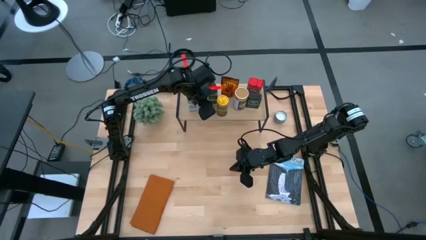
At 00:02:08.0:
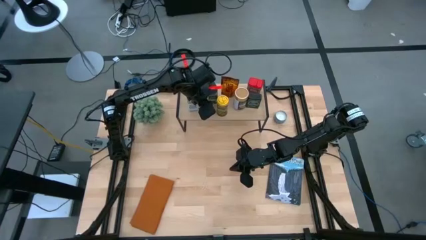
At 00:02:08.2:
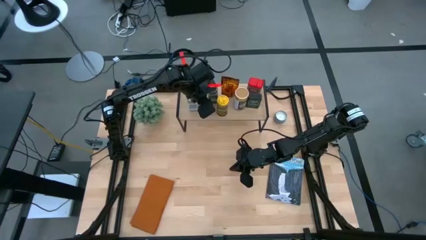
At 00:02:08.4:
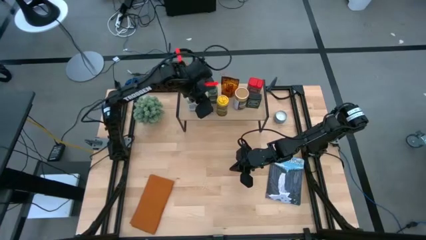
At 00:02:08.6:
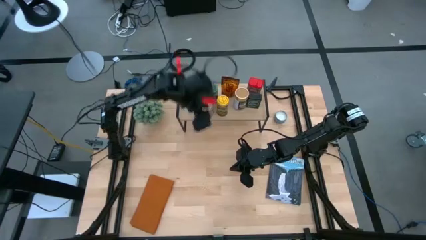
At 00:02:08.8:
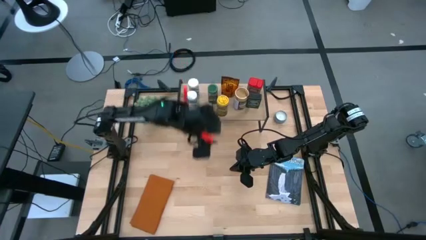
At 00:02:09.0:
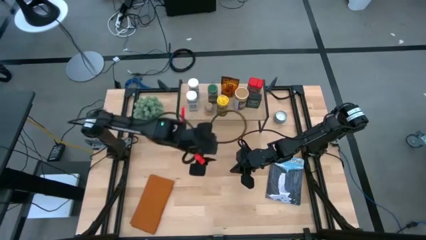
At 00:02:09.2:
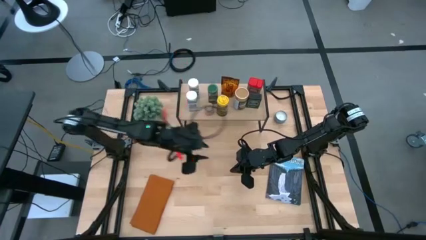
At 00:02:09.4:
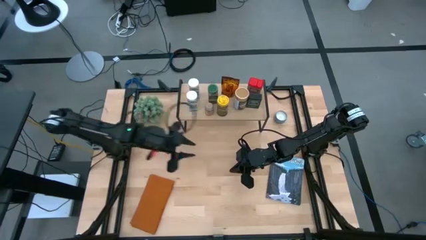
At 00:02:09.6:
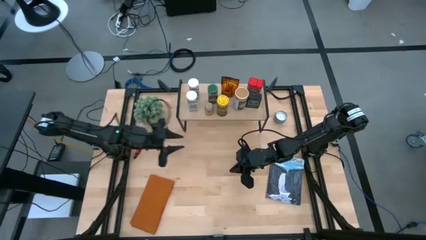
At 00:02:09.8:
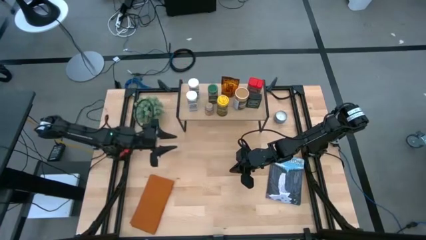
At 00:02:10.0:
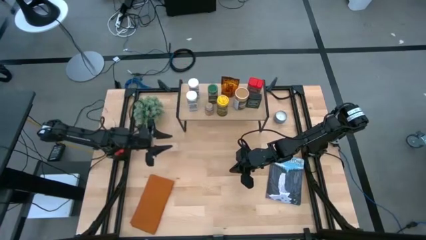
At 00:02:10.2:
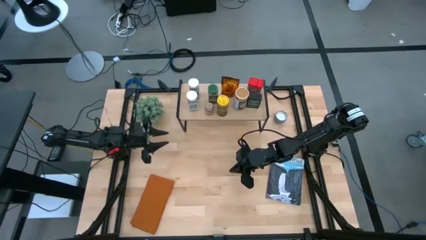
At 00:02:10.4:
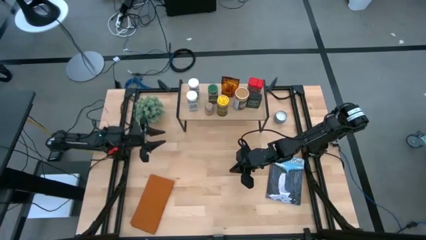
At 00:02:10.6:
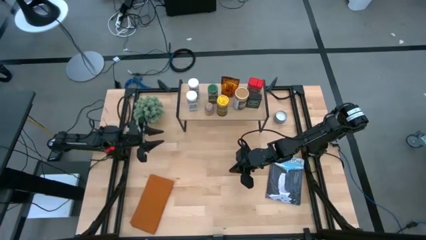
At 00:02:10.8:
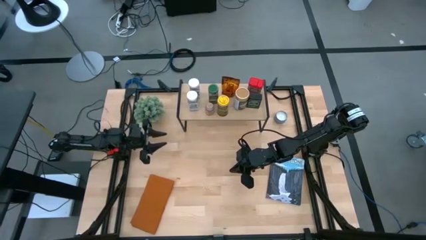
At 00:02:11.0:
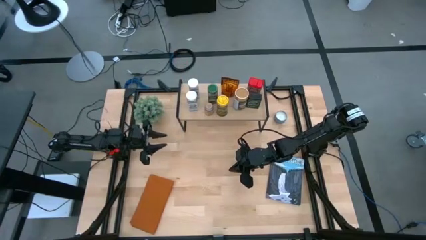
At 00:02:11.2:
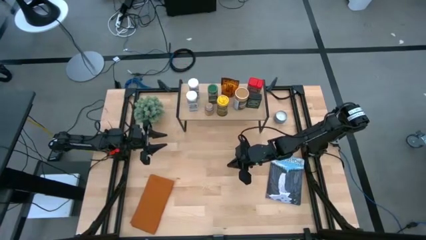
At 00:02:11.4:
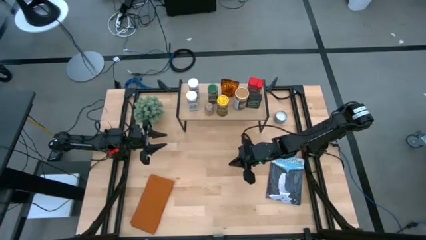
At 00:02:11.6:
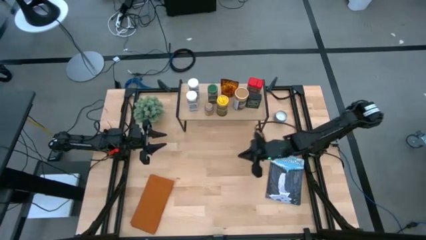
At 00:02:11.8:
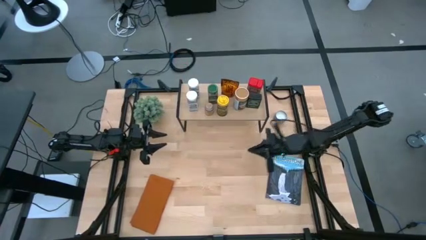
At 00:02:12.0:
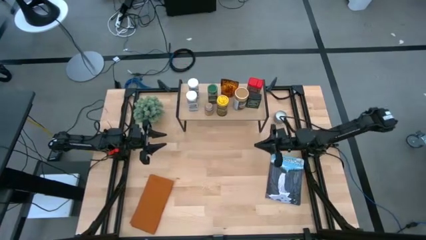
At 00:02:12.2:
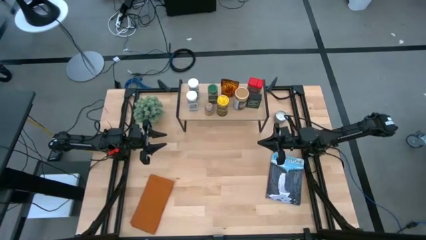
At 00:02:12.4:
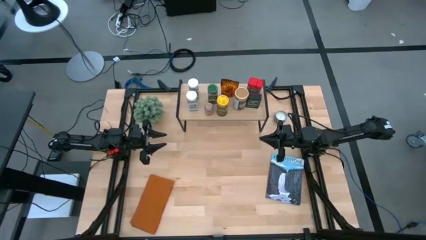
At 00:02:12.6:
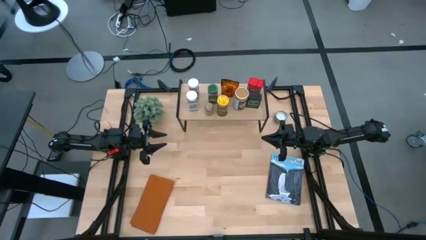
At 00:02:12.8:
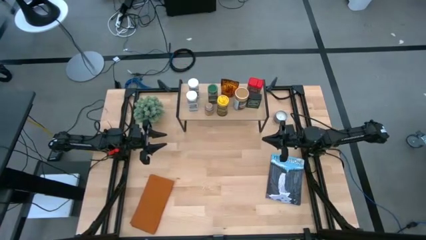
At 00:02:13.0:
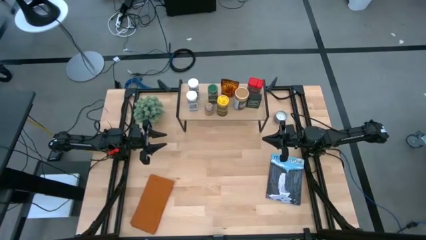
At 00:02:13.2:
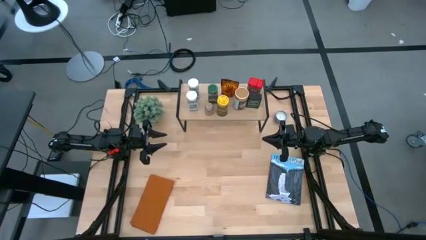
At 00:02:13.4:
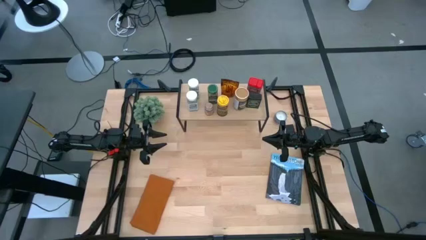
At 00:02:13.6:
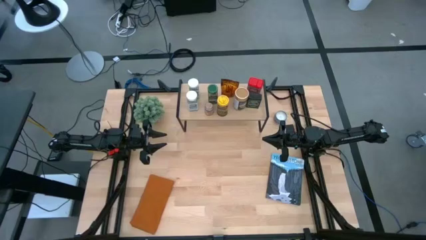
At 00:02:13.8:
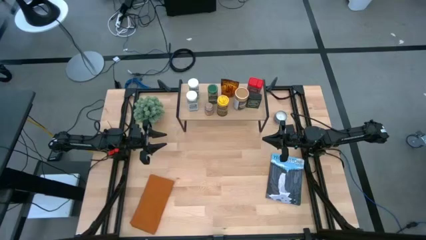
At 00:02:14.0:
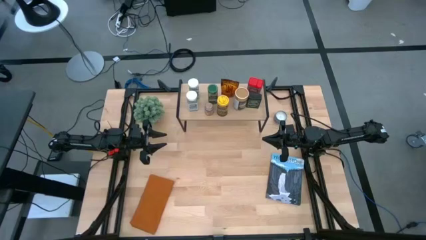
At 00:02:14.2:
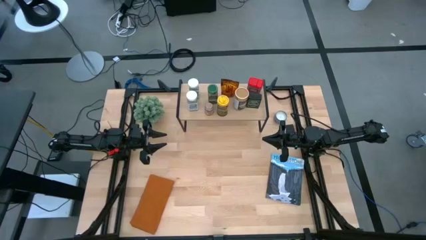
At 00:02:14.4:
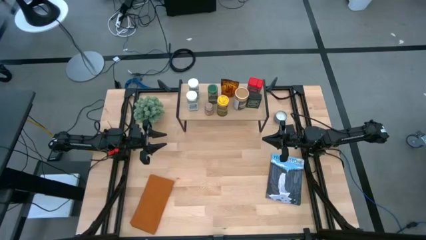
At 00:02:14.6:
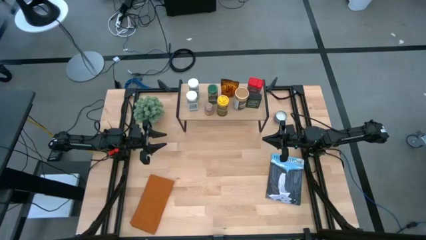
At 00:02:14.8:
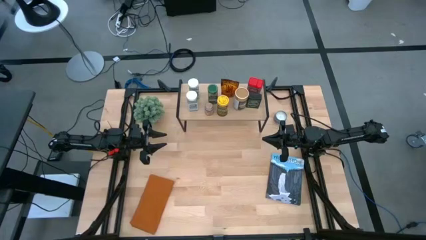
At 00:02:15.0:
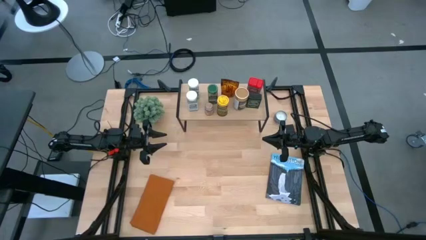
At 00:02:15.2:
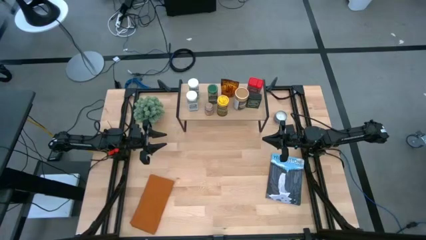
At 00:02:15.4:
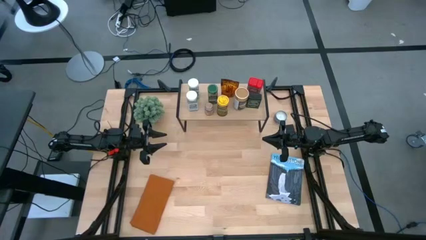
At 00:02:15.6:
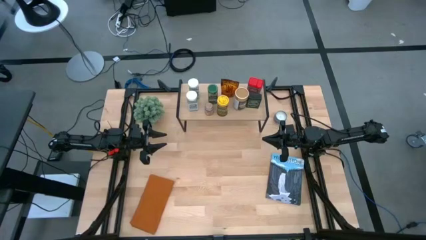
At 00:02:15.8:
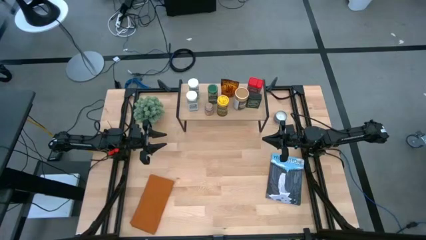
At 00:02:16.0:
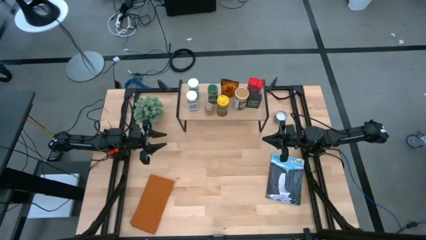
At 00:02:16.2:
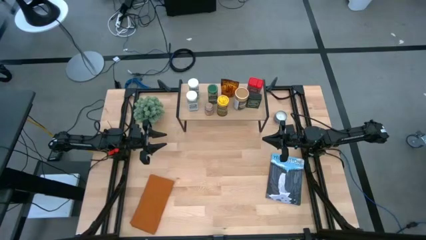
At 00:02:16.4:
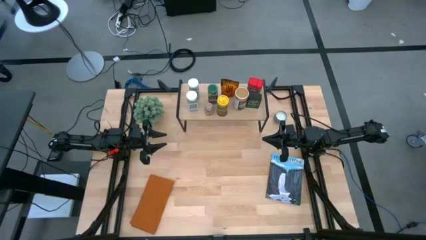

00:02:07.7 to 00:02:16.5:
Task: Shelf spices
Return to Home Position
